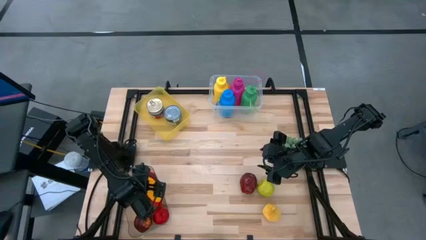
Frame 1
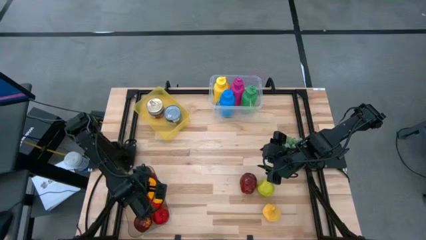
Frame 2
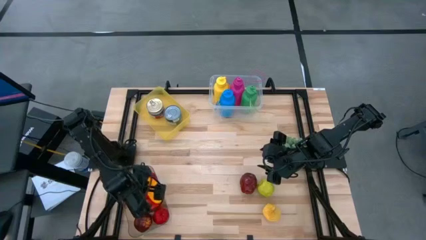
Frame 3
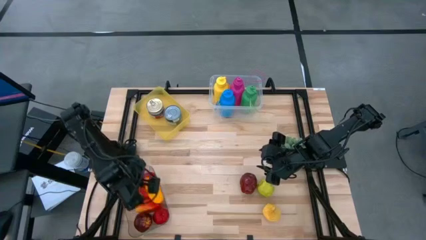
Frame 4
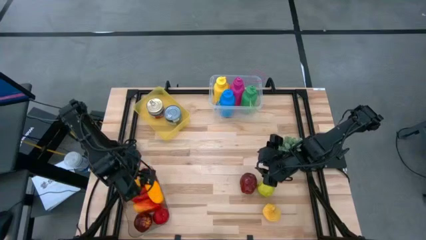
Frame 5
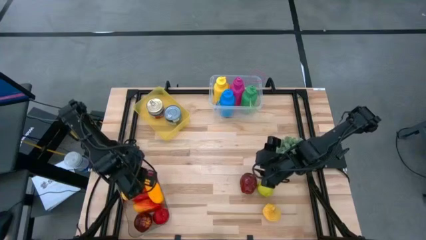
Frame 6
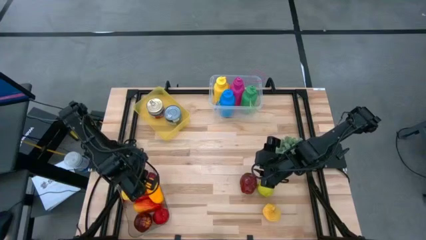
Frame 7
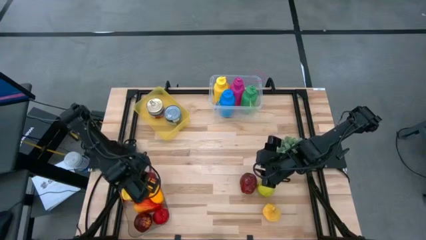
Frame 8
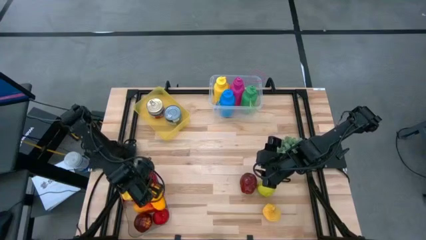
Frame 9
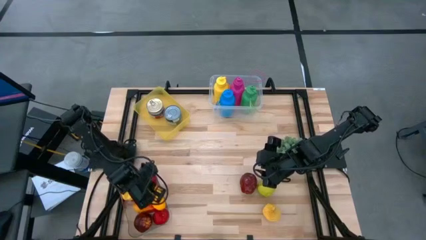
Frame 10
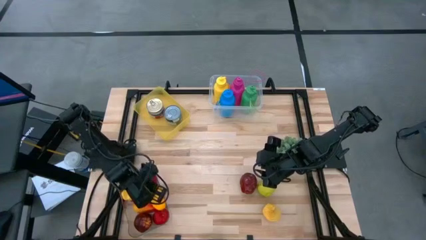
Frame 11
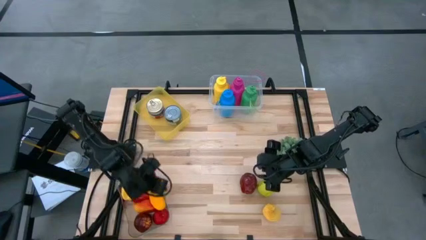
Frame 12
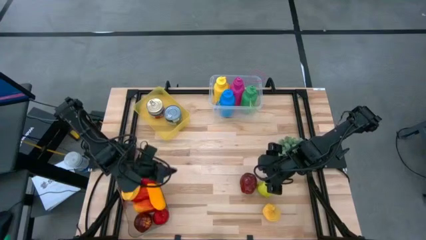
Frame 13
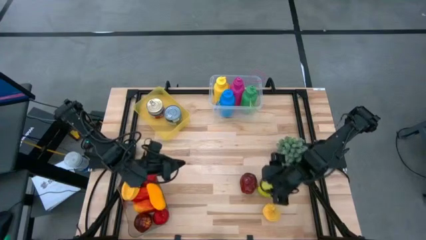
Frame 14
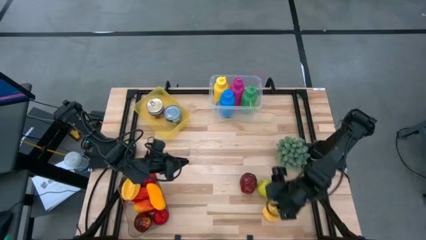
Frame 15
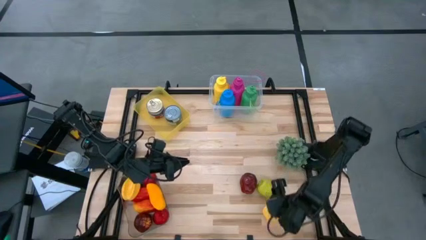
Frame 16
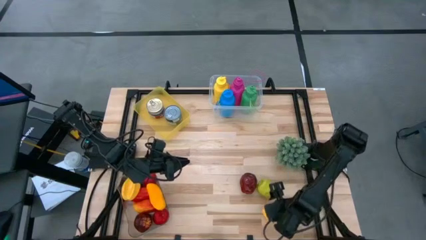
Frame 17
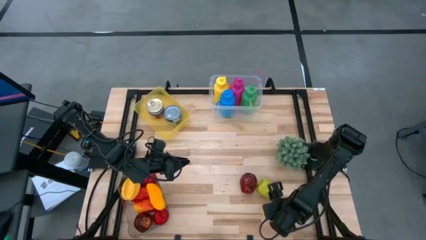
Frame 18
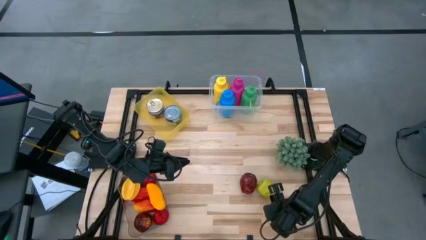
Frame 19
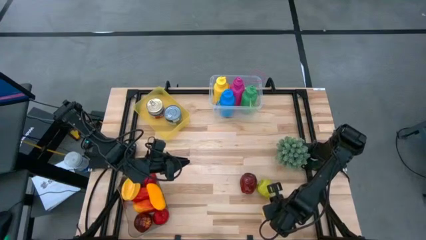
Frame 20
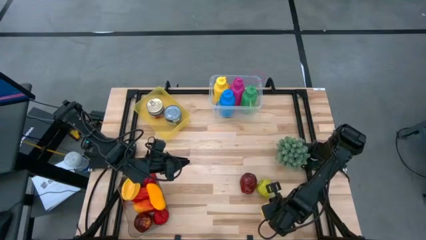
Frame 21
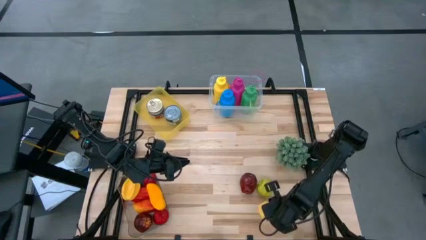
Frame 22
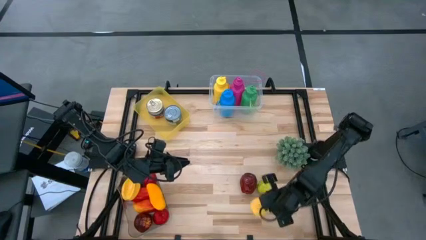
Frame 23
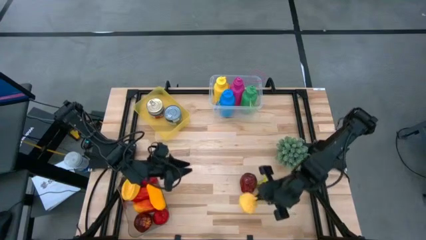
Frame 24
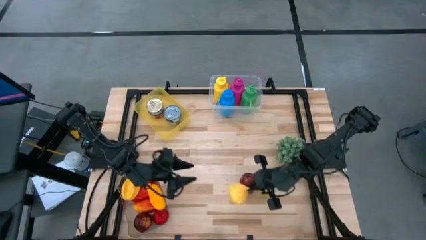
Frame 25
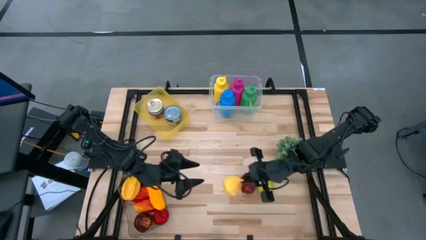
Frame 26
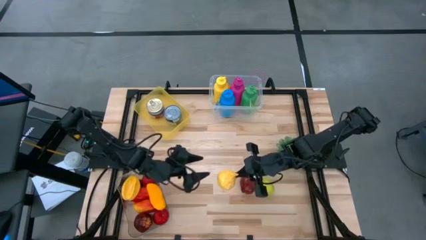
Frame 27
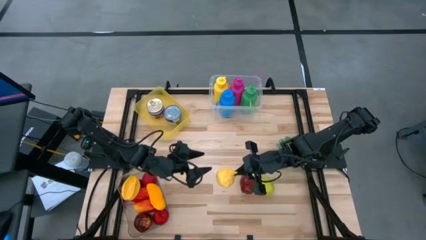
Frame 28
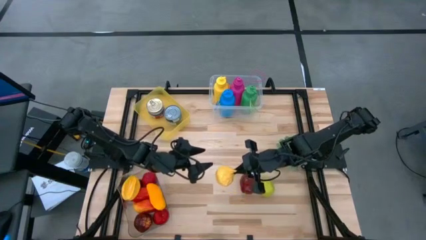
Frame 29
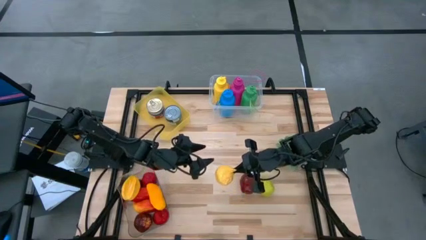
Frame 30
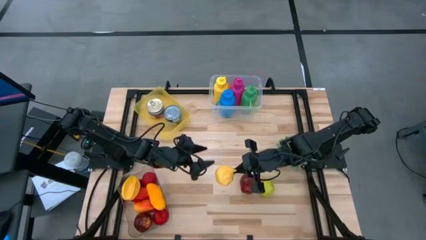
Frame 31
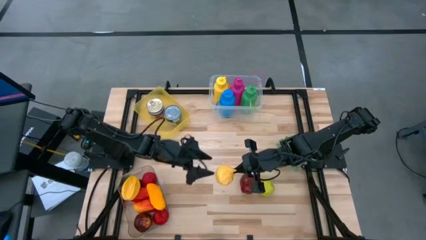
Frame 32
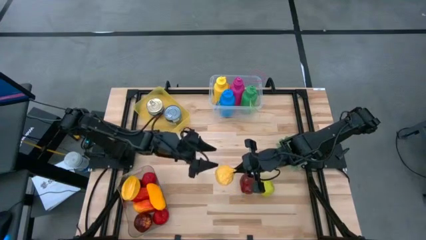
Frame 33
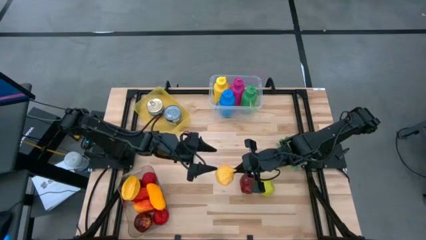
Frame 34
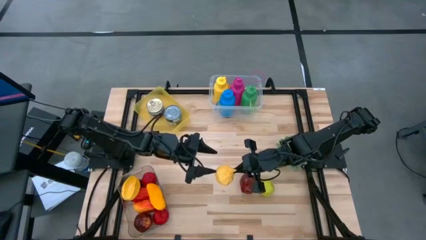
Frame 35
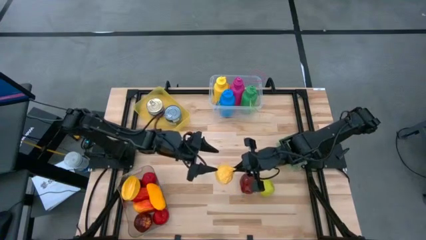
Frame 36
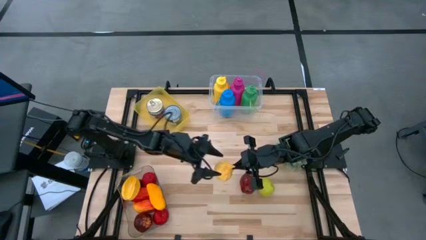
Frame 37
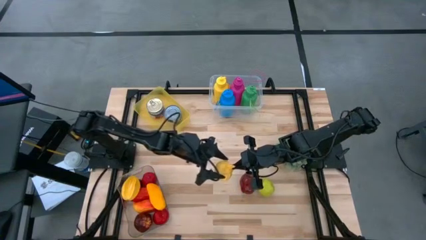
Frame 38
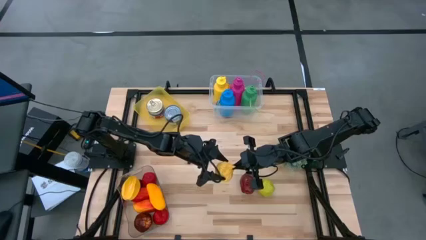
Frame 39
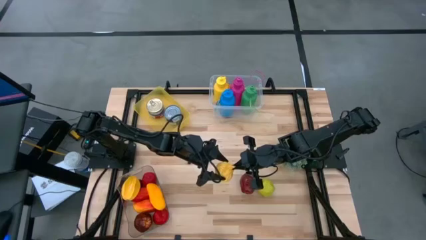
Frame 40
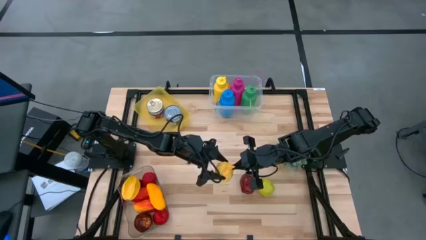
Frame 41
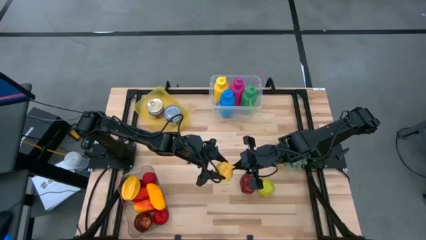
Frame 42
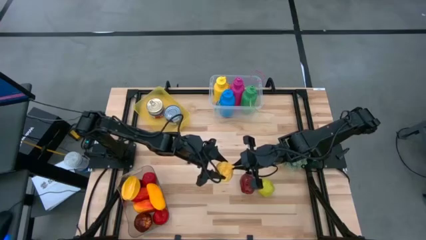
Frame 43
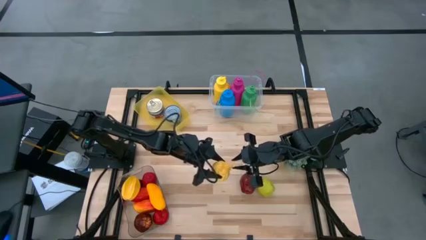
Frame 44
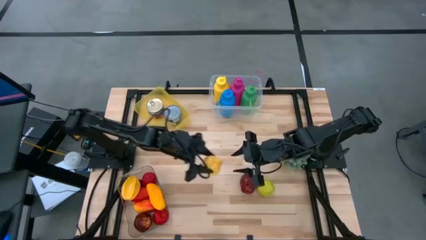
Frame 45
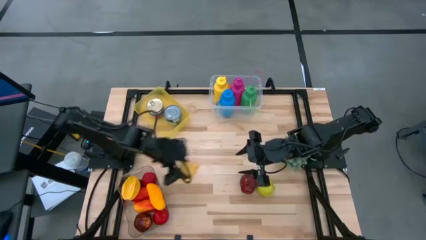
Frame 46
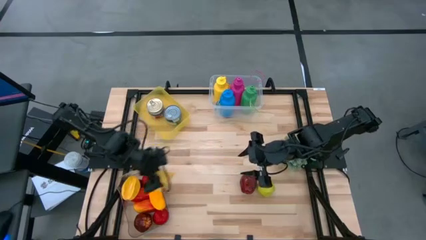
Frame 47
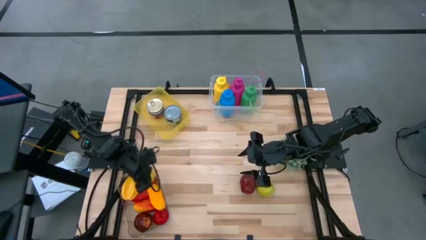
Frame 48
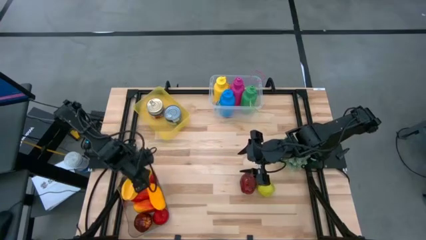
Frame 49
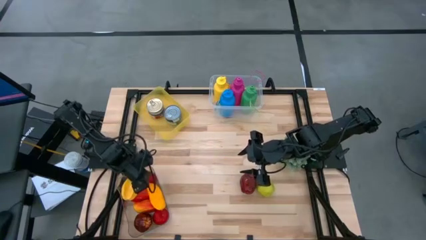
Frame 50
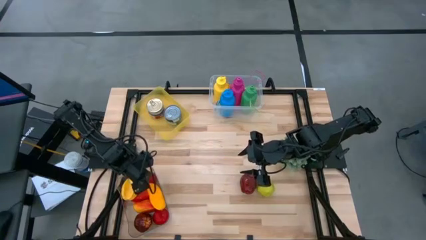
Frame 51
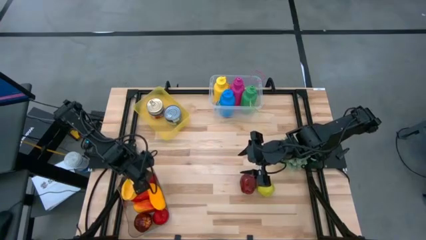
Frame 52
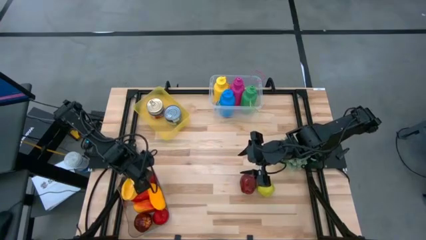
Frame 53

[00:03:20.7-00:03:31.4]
Task: Pick & Place Food Item
Put the yellow garlic into the transparent bin
